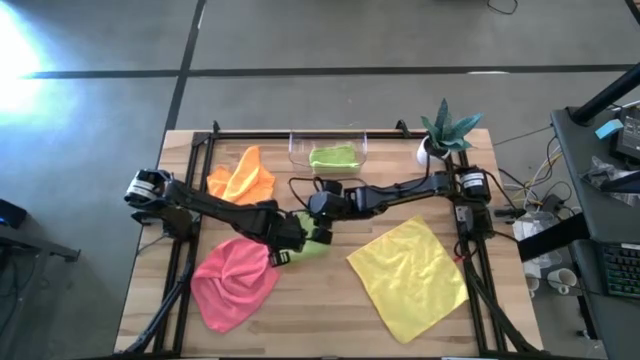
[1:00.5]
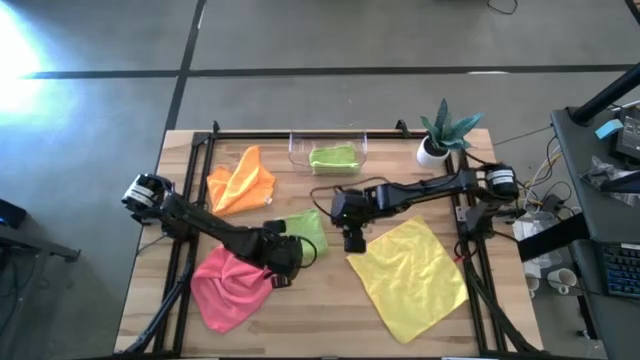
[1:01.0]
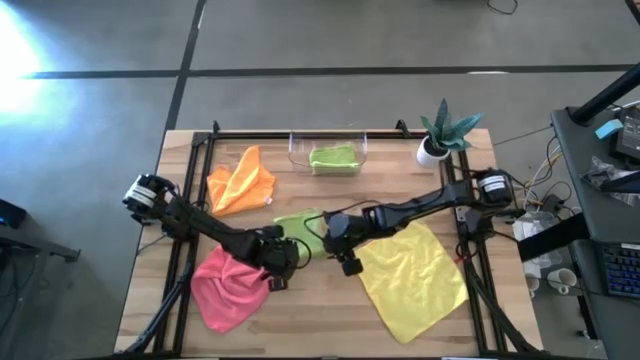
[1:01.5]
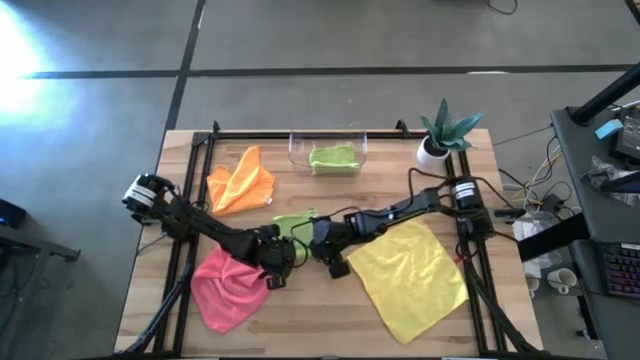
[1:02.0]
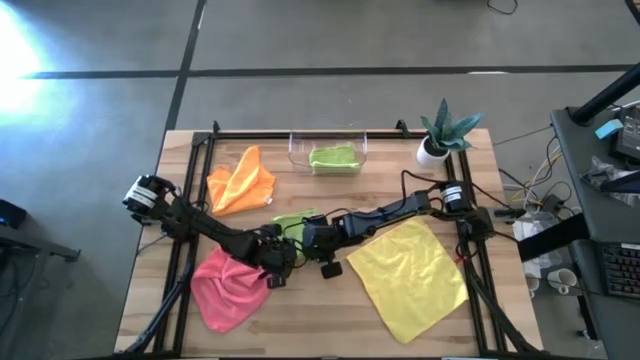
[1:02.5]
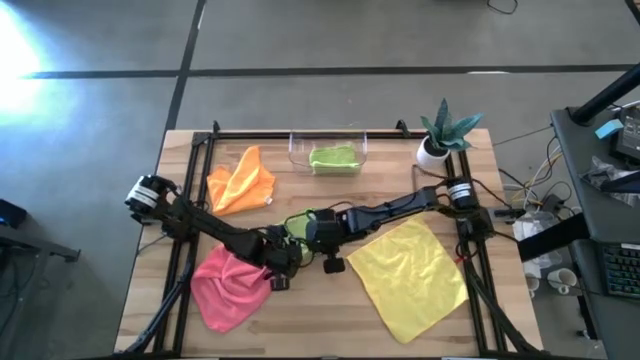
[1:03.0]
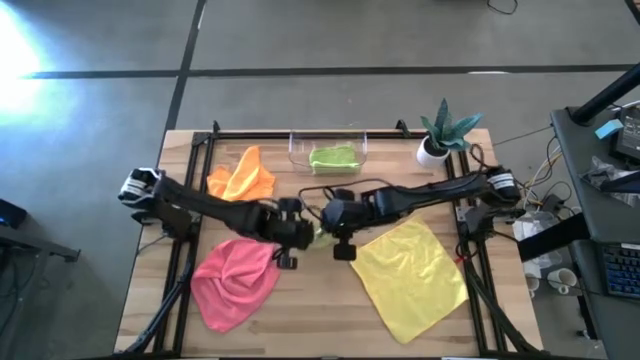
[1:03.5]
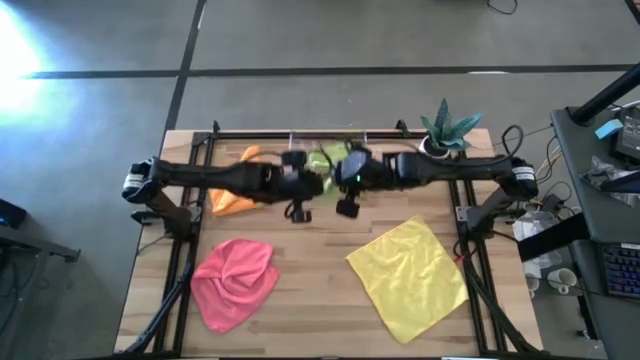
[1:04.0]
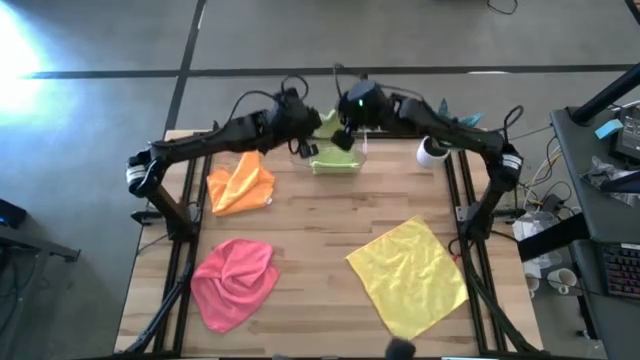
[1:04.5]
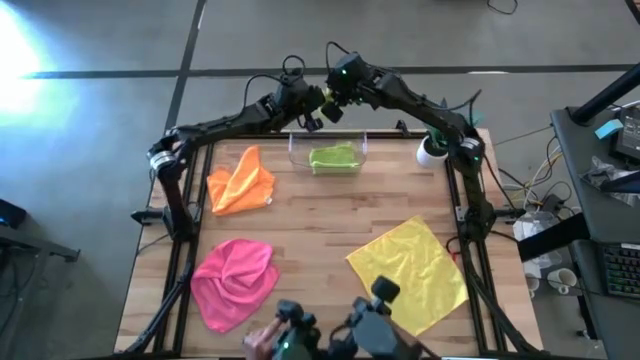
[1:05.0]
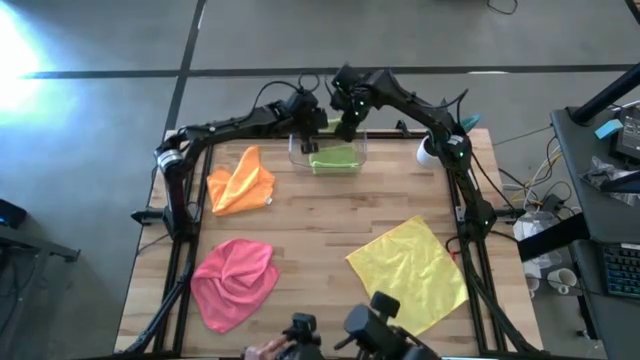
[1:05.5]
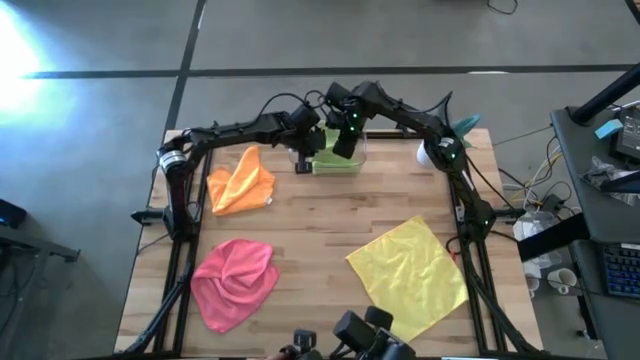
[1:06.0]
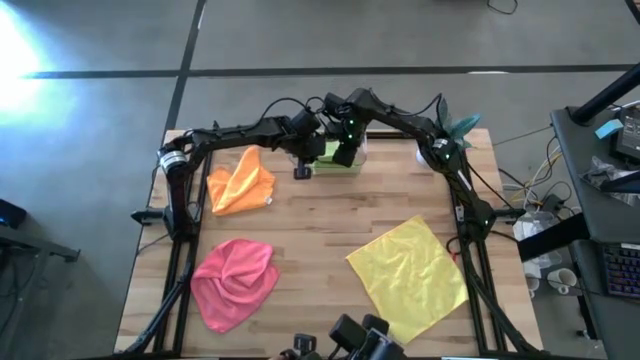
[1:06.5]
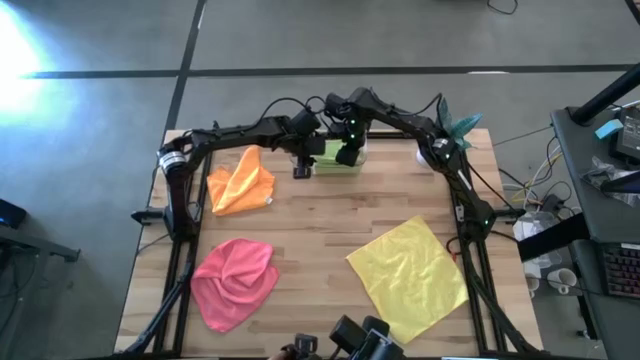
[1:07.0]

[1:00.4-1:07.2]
Task: Fold microfiber towels
Stack the green microfiber towel on top of the green microfiber towel into the transparent bin

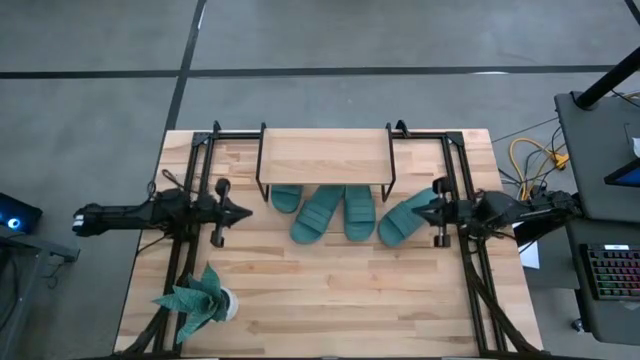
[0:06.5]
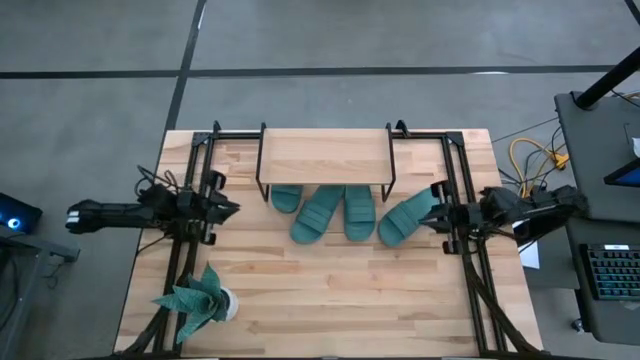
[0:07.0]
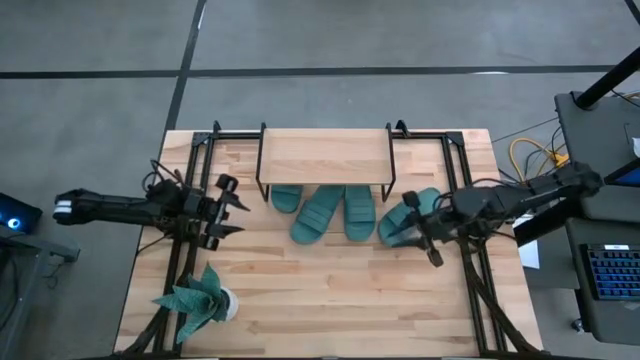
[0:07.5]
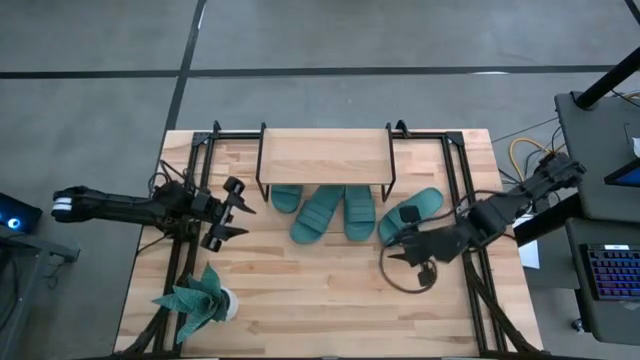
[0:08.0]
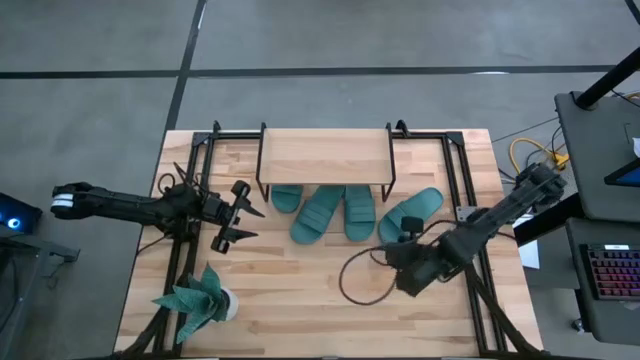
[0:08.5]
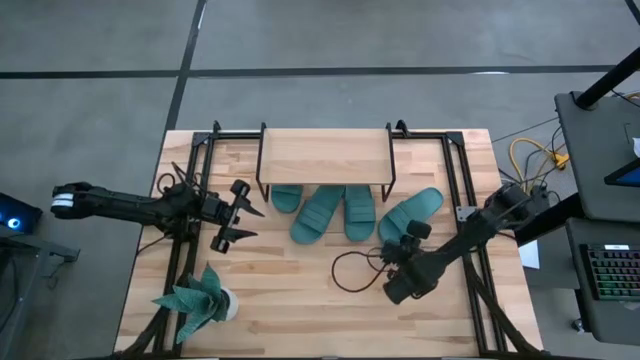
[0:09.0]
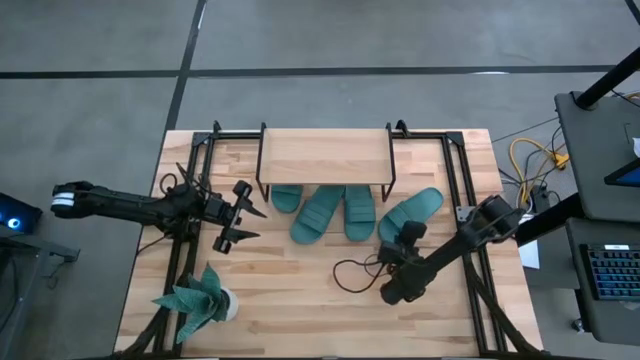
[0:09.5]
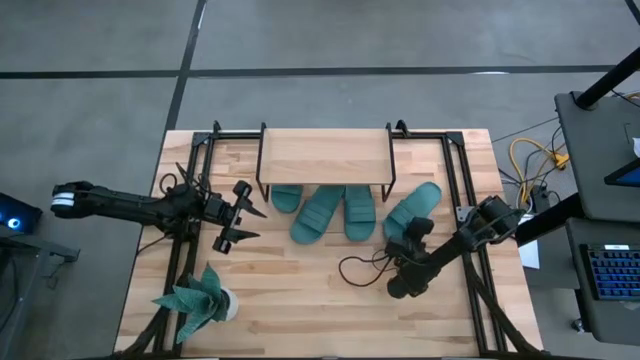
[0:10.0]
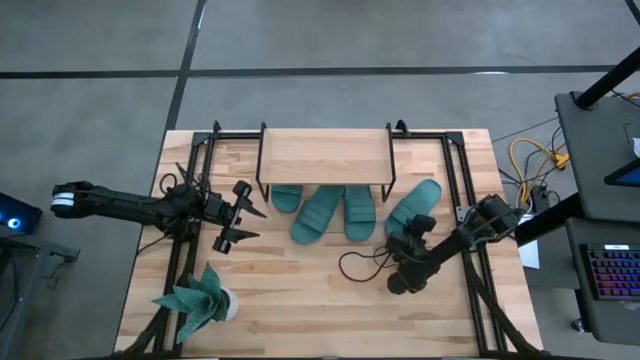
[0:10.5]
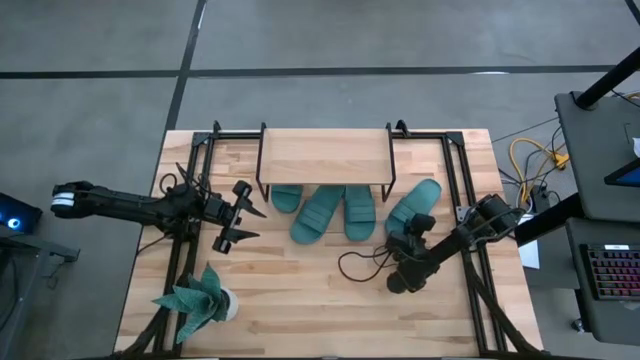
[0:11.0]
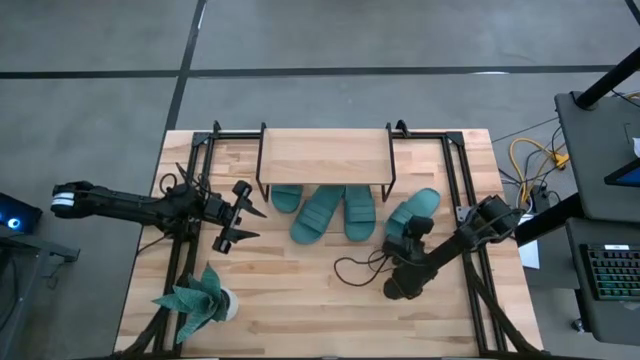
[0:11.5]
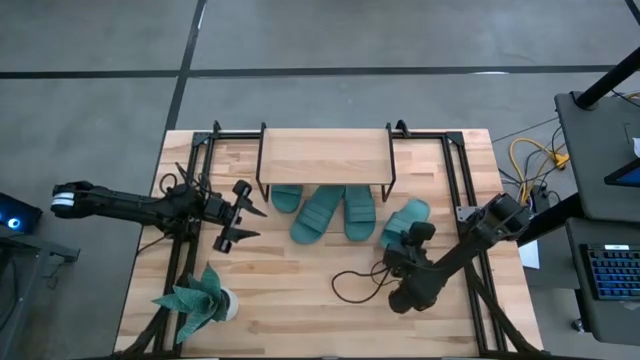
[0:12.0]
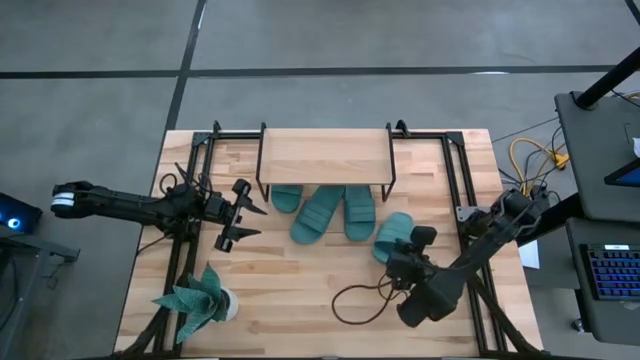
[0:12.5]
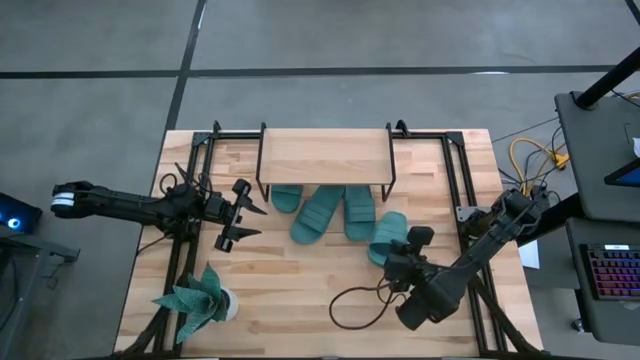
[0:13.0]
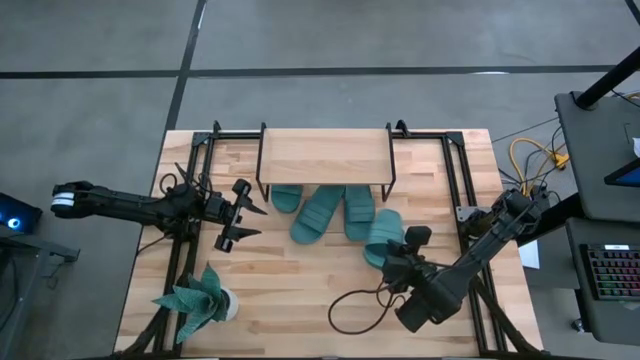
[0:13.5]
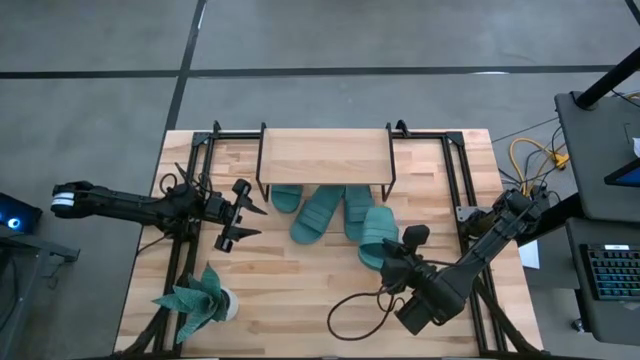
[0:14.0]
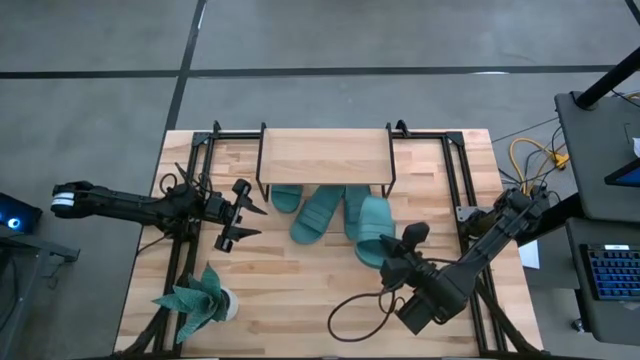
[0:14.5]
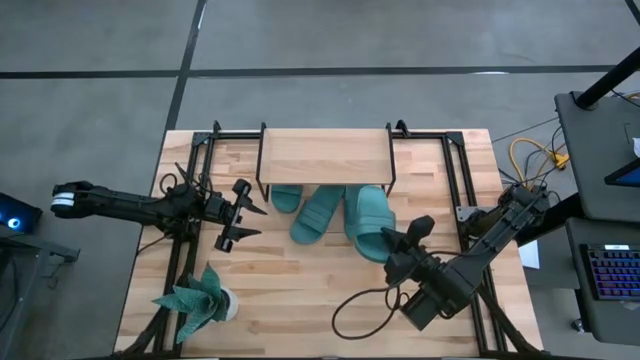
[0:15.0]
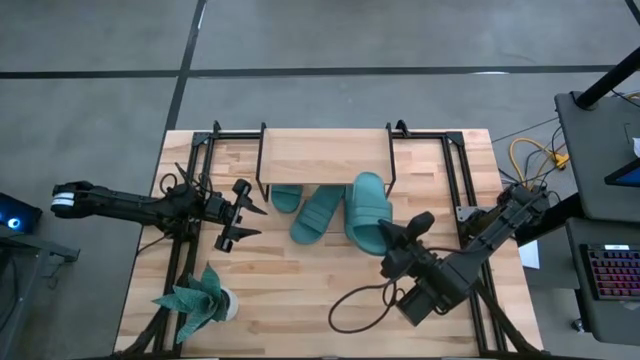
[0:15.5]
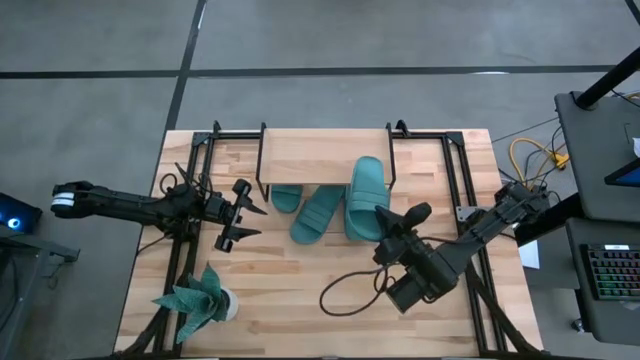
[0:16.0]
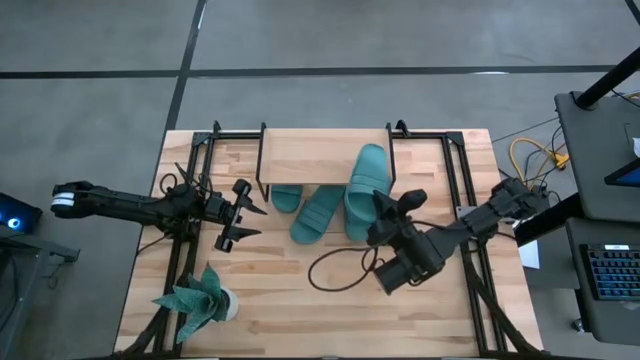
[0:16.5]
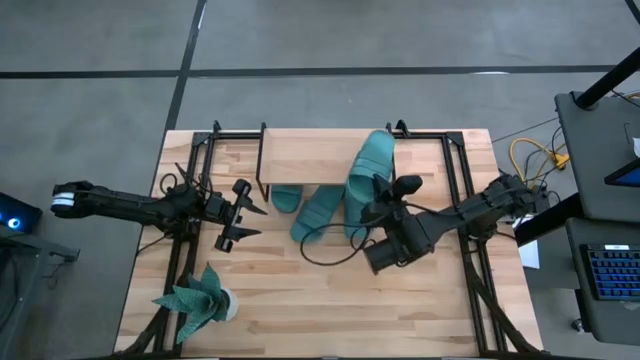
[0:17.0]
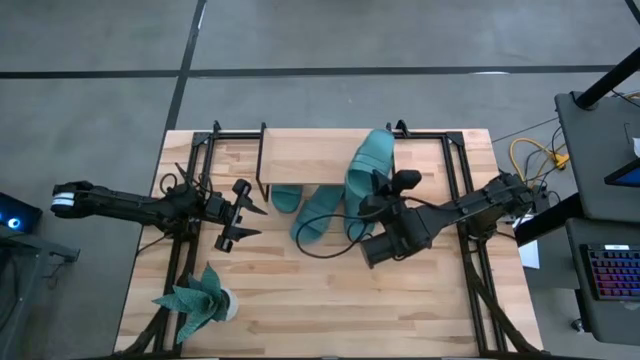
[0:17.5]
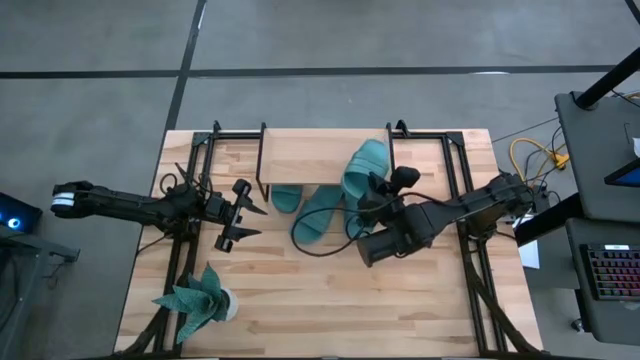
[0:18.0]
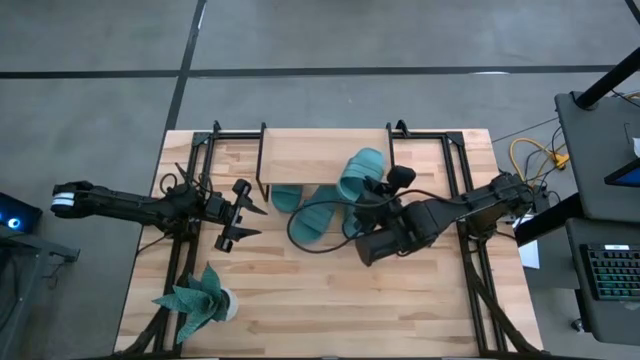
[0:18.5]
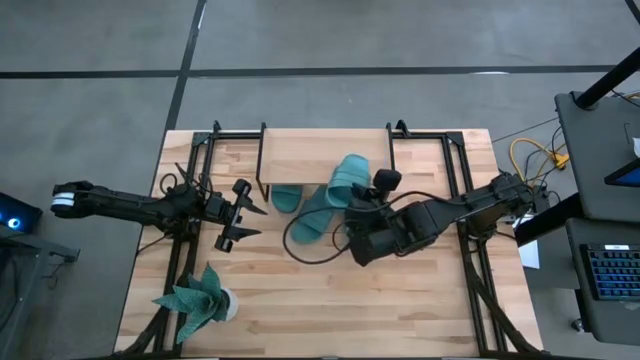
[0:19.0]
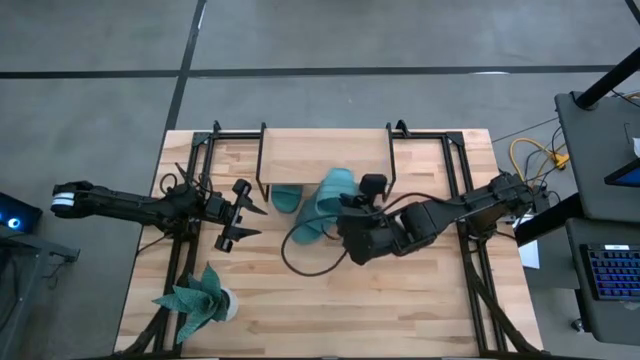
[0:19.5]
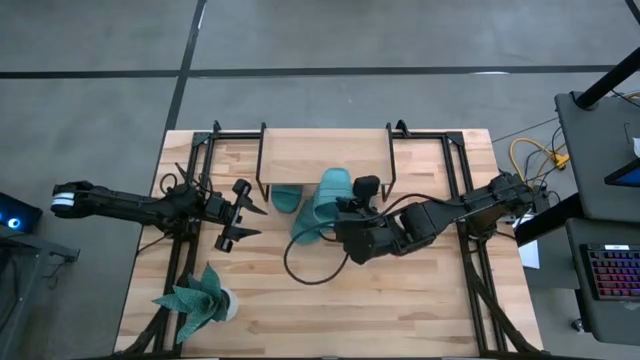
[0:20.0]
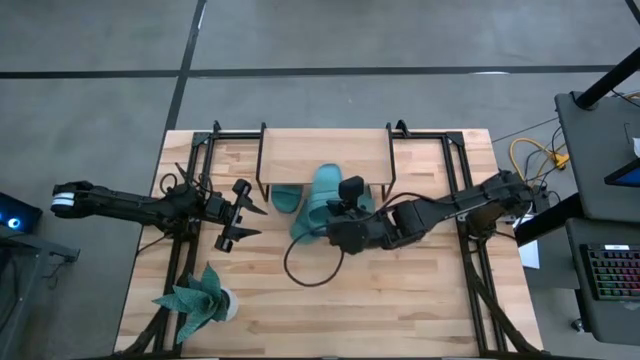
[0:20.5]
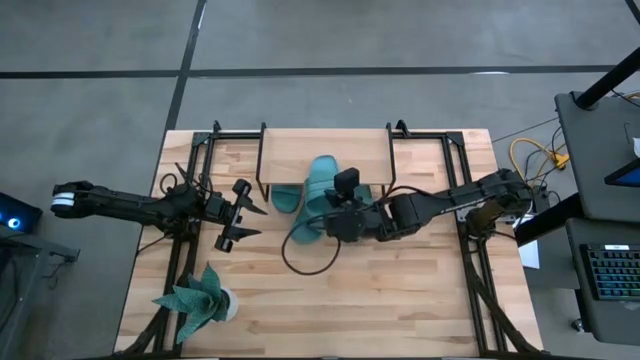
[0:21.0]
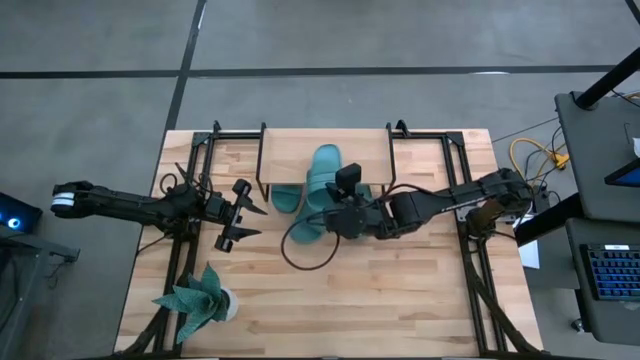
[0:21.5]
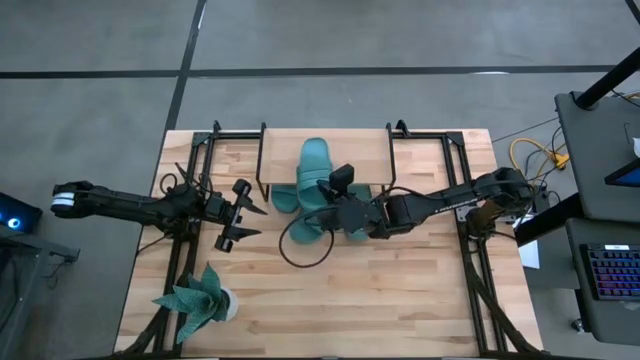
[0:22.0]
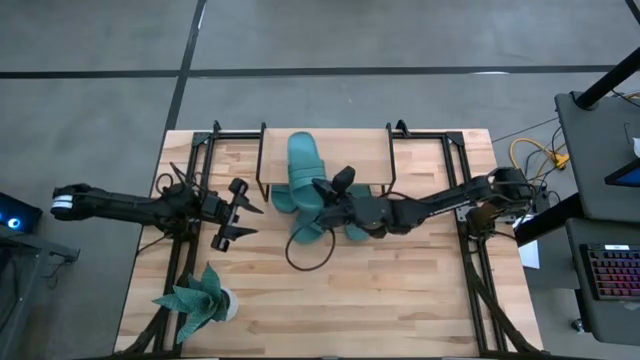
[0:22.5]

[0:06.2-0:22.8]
Task: Pick and place slides into the shelf
Put the blue slipper on the shelf
